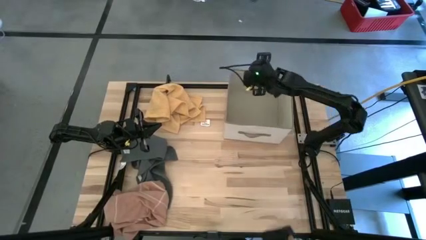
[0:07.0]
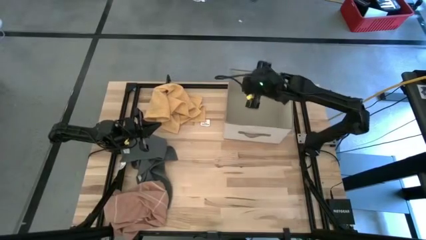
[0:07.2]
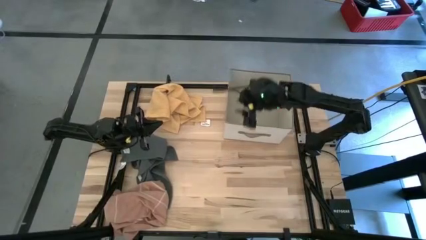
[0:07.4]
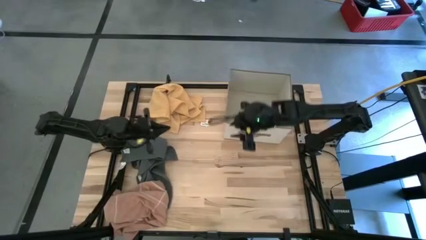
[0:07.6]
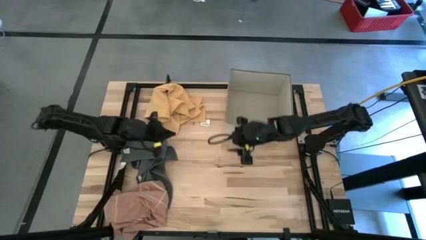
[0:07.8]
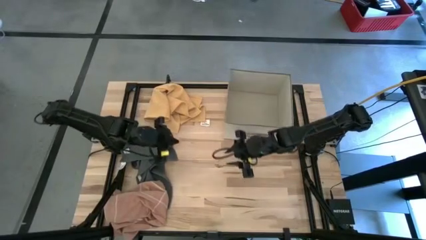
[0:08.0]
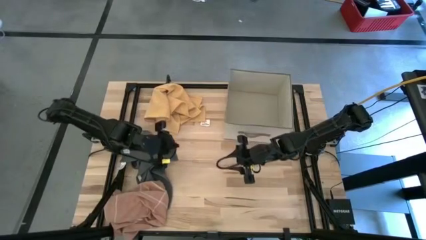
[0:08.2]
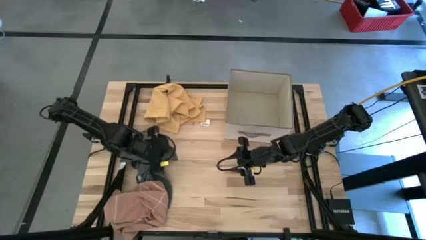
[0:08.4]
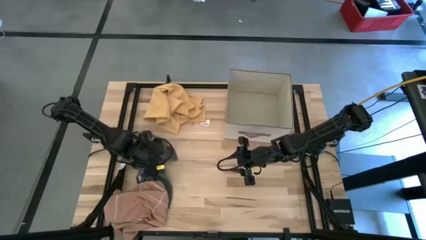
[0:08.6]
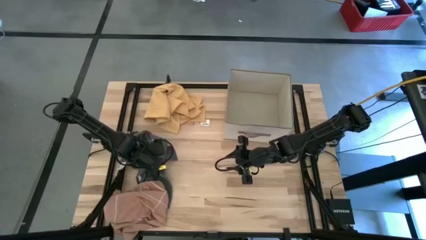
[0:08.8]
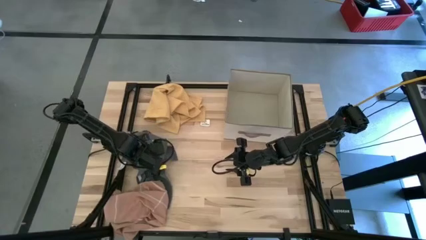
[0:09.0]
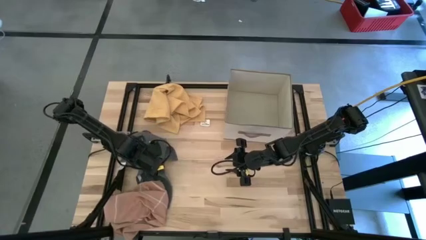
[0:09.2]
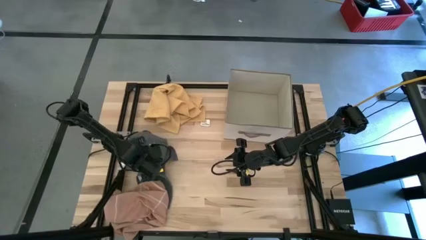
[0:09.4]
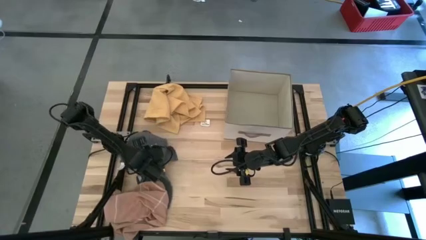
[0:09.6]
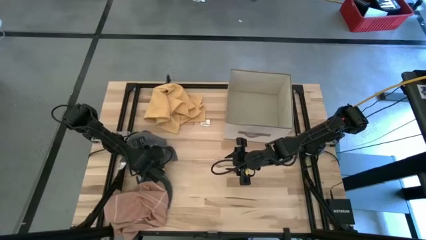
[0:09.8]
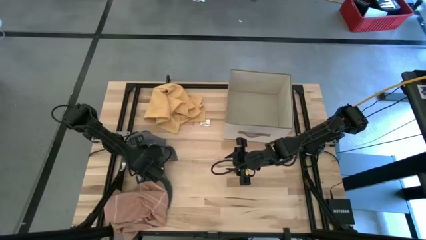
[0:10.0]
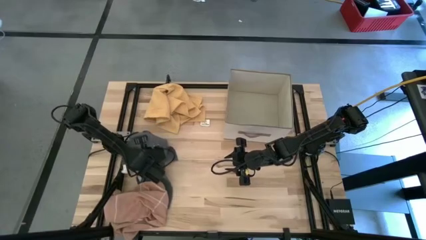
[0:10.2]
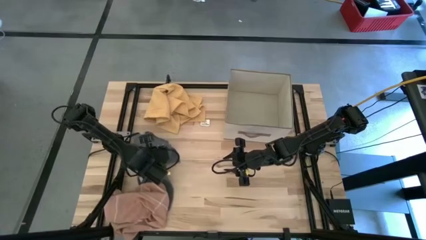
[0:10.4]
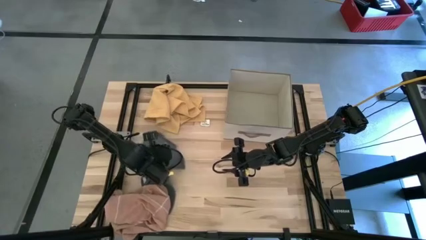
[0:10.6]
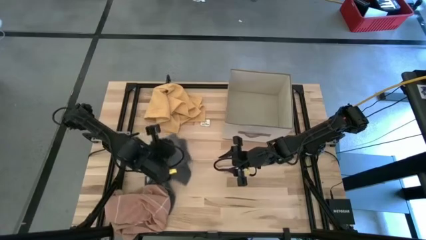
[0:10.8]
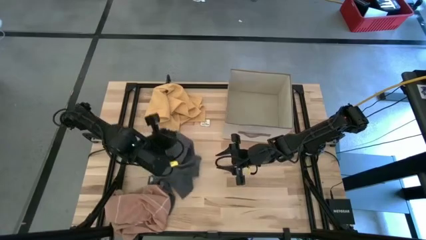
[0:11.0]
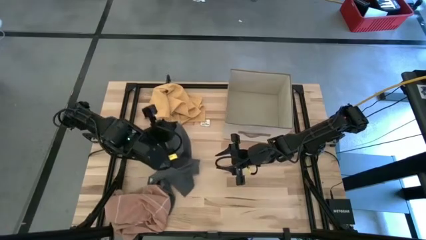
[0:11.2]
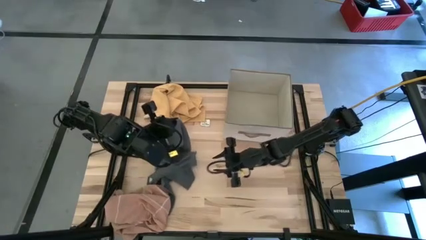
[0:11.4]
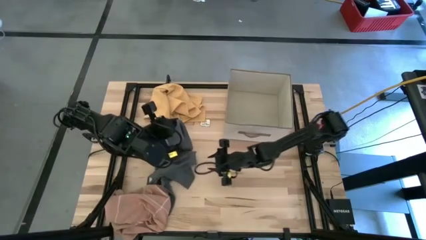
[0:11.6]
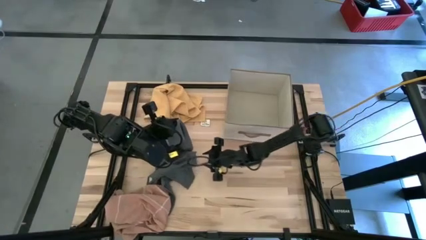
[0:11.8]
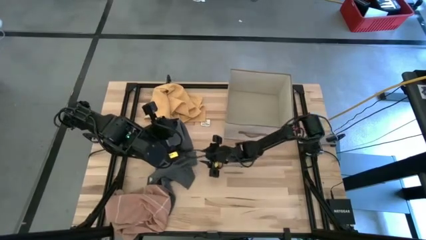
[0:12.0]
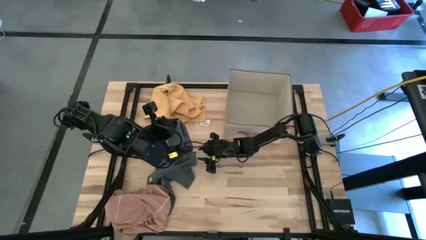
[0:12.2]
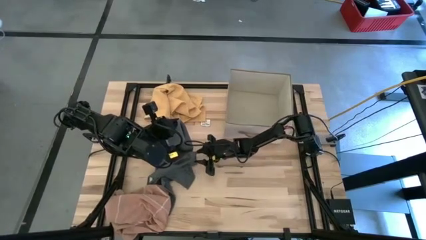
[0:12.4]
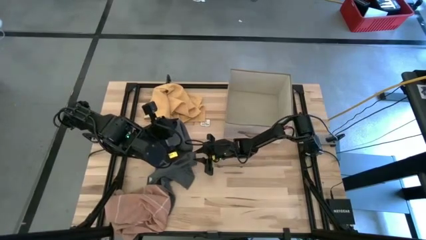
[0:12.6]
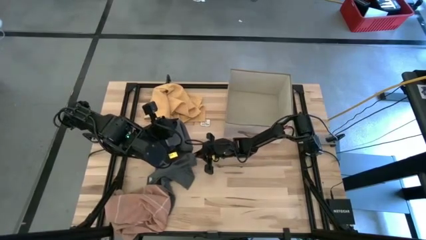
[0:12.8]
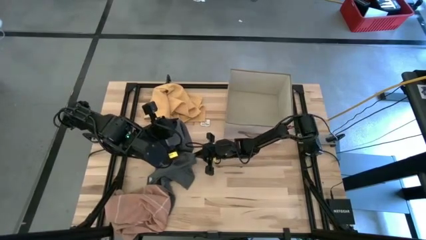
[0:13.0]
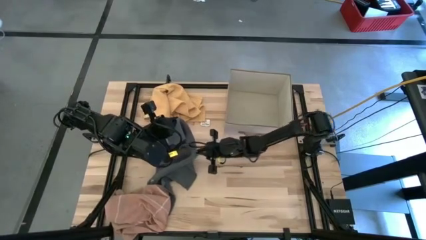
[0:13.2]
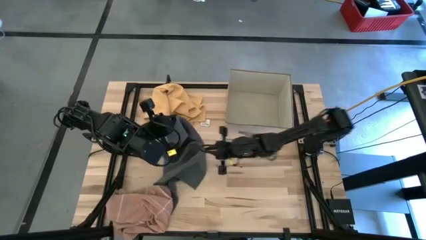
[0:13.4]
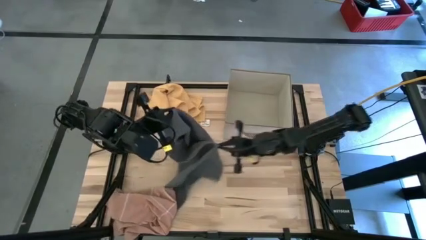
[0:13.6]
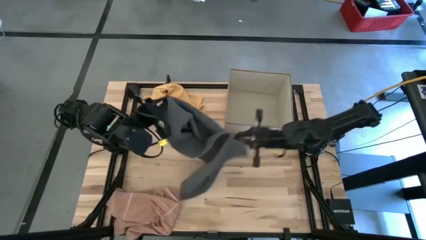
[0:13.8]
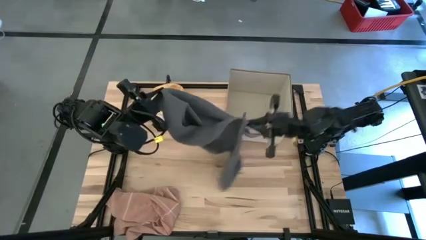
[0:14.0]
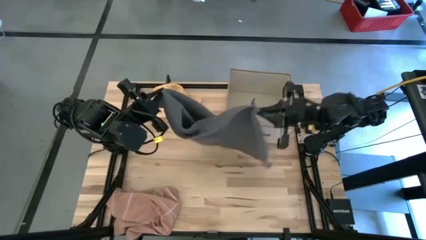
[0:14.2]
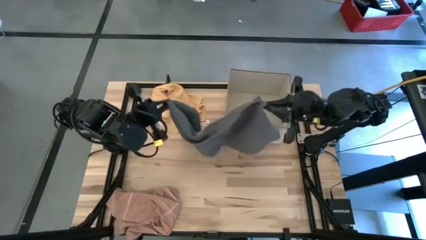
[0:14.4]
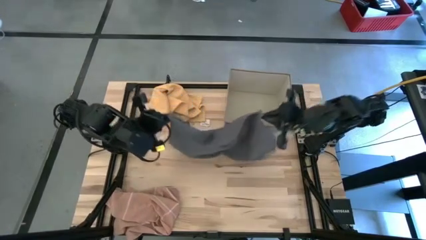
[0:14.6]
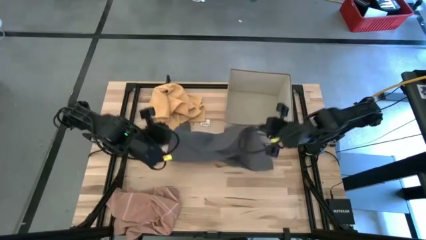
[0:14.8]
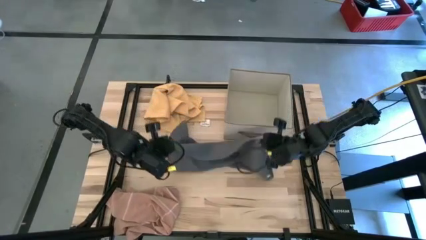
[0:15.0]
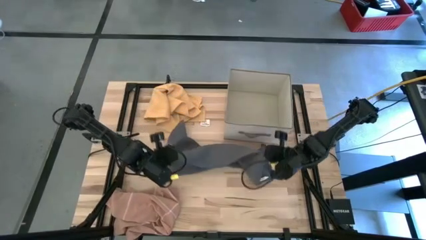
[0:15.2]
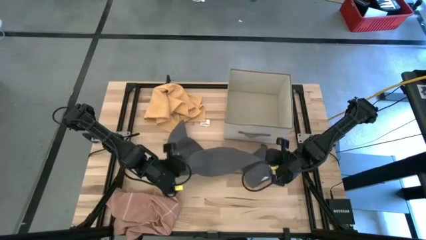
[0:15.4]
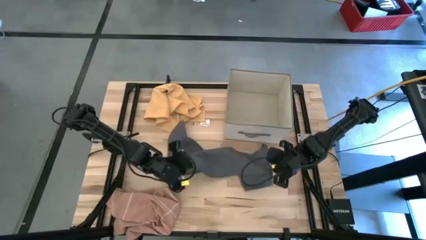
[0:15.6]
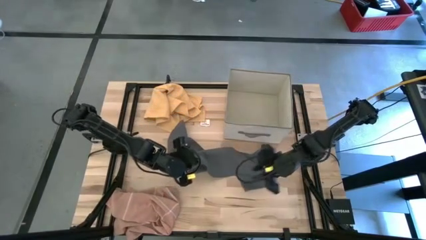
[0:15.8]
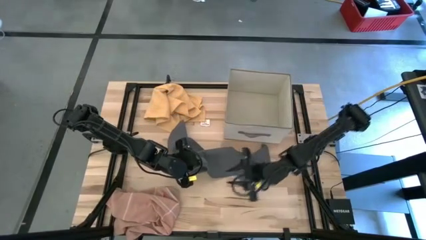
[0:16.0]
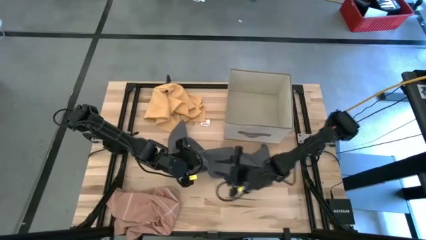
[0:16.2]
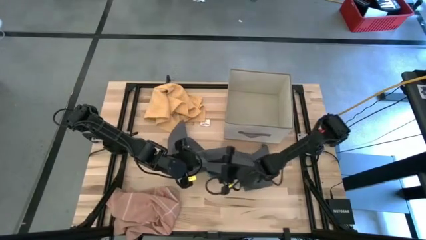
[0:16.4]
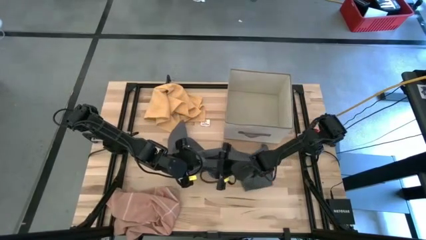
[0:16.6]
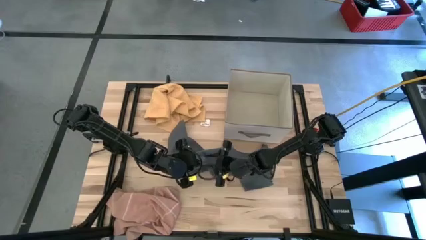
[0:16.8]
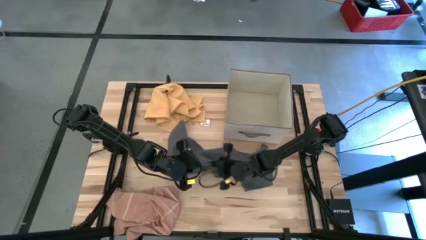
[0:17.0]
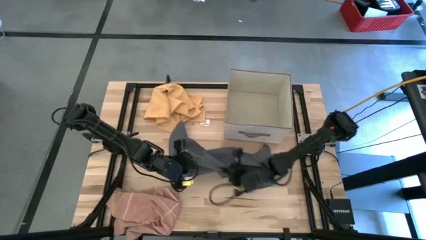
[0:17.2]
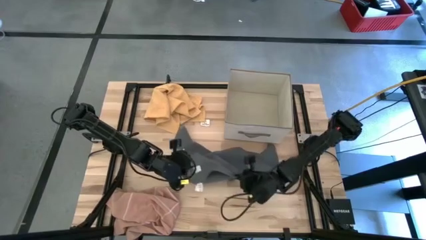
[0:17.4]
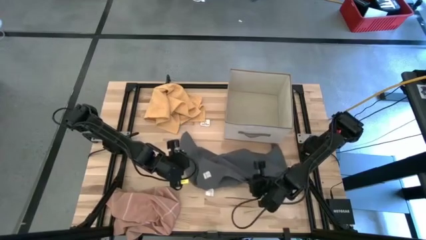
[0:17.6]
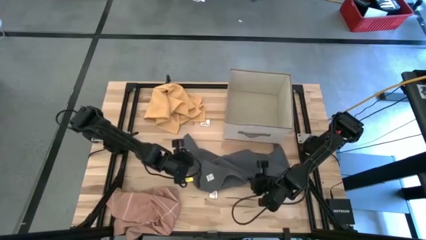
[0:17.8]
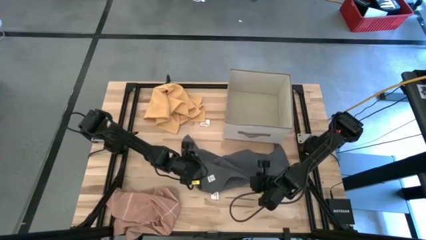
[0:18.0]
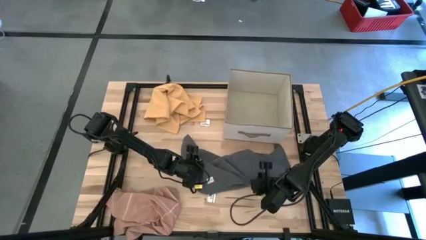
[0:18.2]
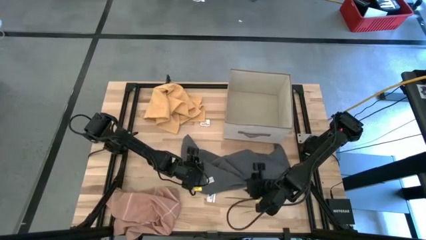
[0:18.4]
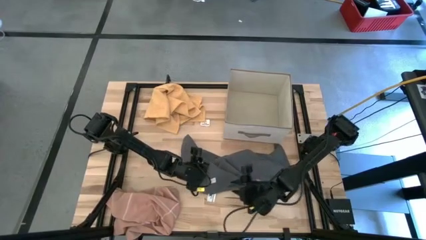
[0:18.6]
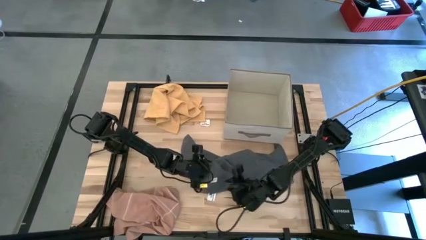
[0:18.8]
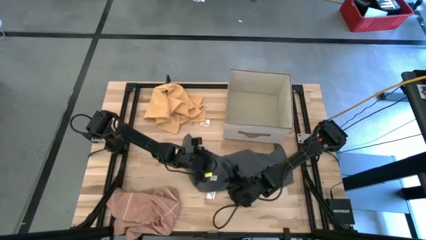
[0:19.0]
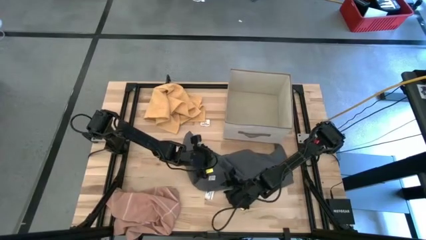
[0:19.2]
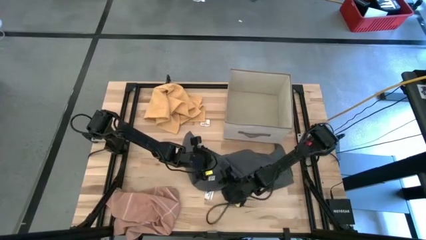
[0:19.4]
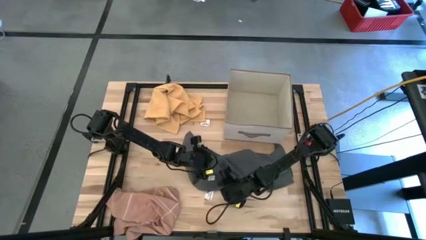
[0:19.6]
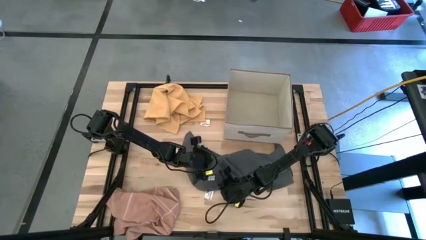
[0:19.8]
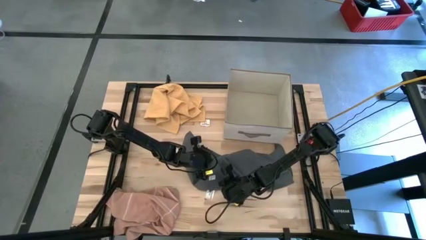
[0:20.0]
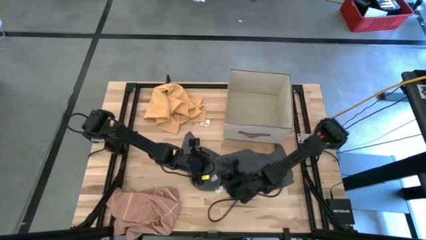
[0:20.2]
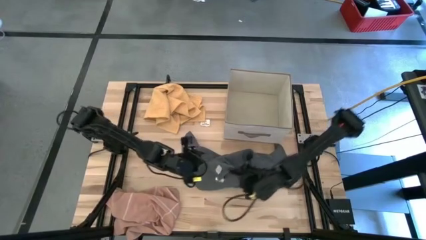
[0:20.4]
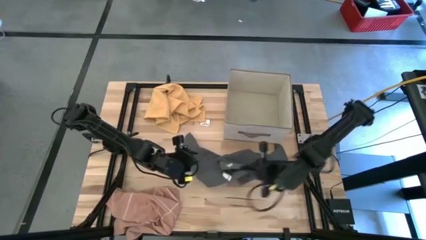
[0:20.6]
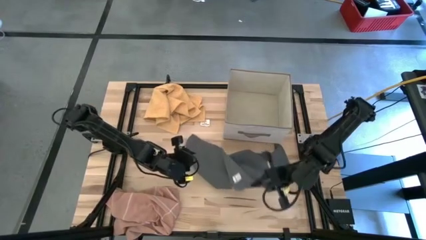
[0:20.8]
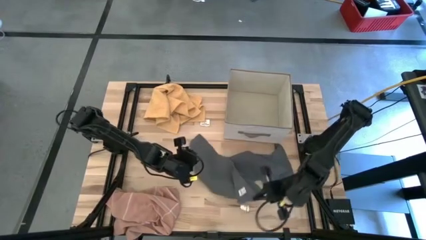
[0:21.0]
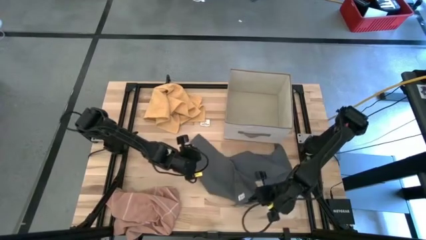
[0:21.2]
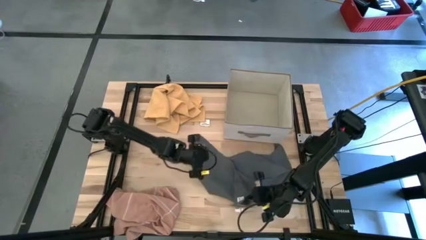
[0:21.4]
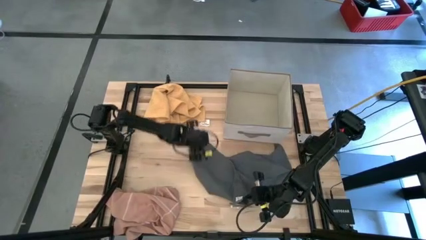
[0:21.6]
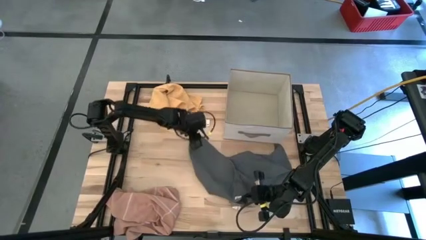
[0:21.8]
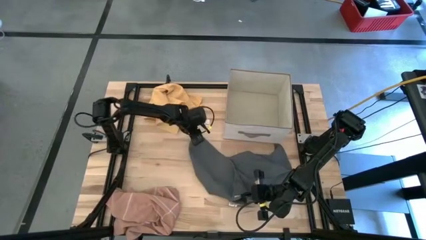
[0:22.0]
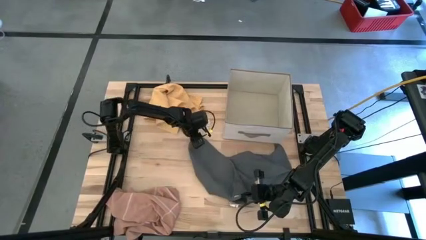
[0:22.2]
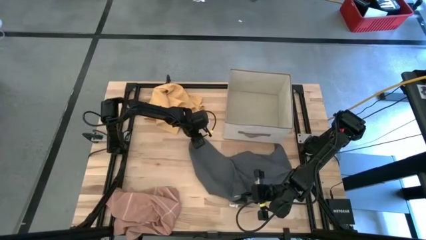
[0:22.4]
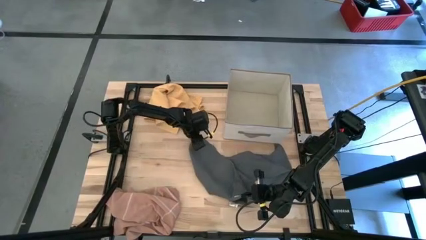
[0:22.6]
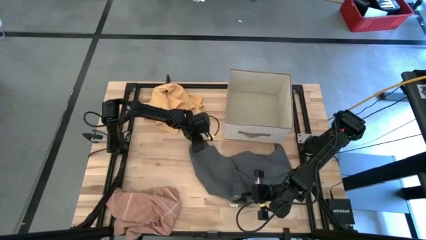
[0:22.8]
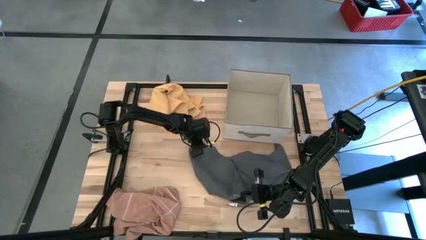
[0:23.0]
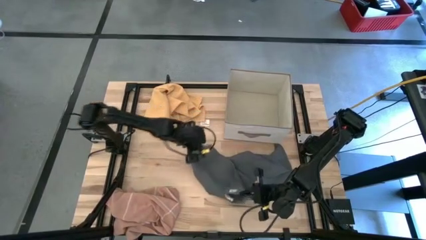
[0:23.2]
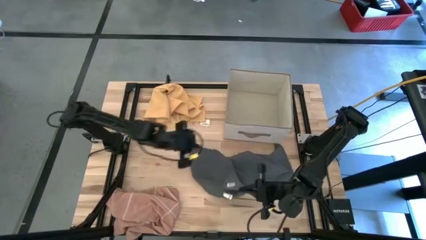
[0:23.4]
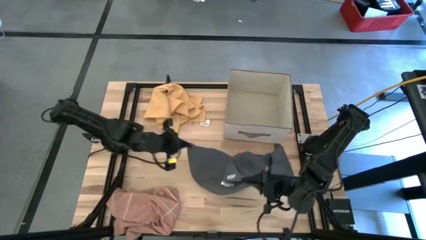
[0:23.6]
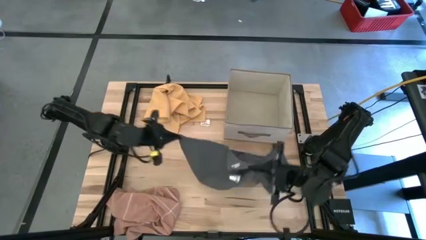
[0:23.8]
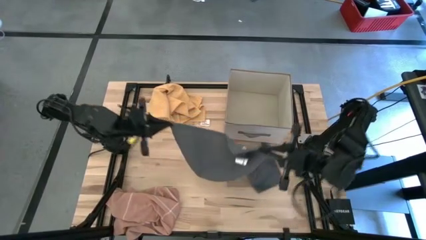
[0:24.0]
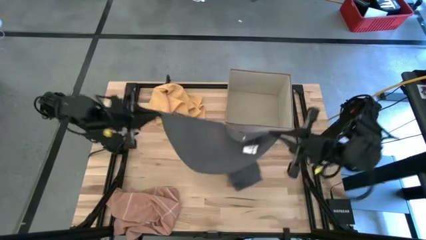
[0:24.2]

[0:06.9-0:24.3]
Task: Fold towel
Fold the gray towel
